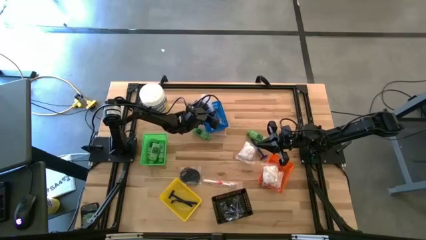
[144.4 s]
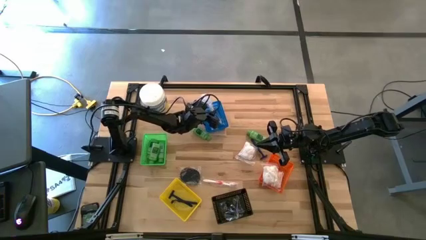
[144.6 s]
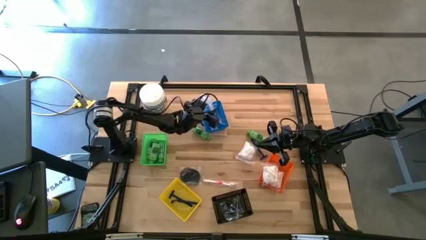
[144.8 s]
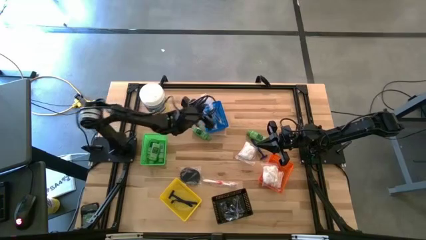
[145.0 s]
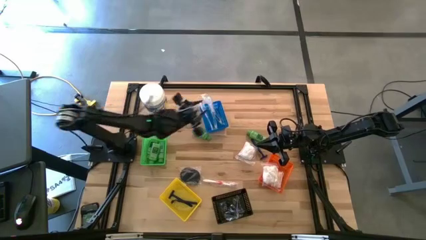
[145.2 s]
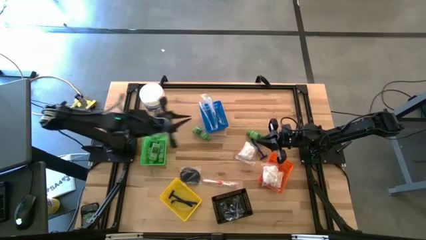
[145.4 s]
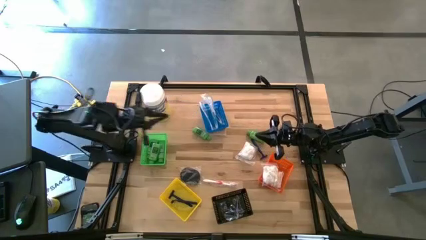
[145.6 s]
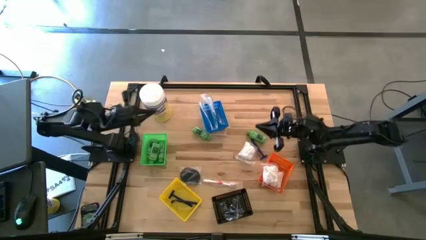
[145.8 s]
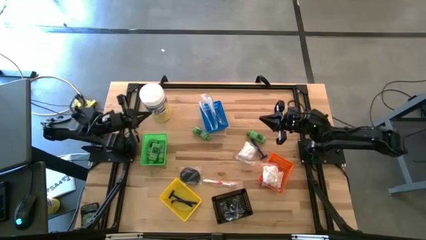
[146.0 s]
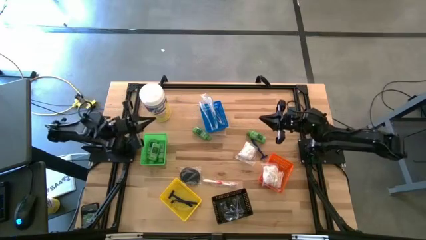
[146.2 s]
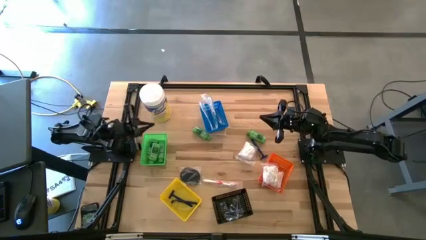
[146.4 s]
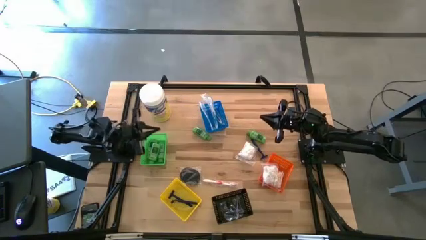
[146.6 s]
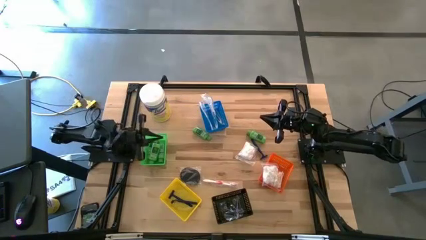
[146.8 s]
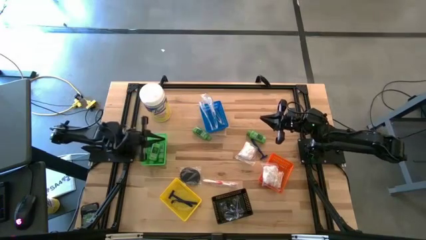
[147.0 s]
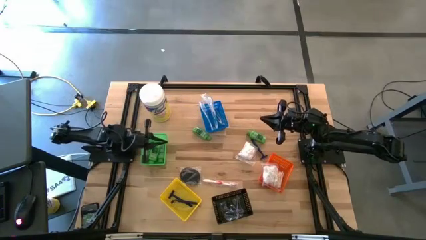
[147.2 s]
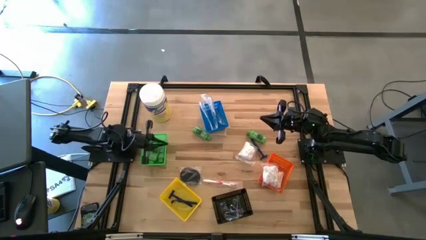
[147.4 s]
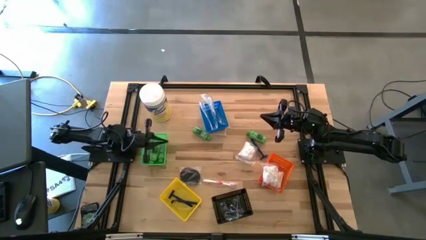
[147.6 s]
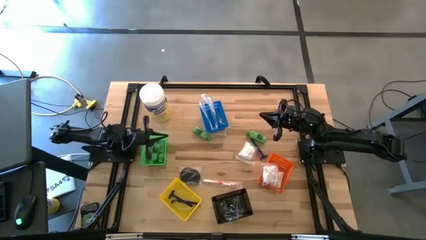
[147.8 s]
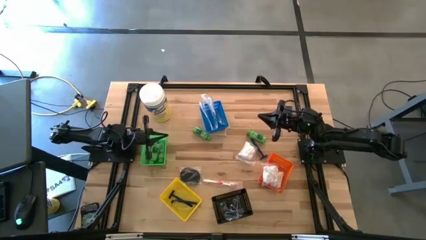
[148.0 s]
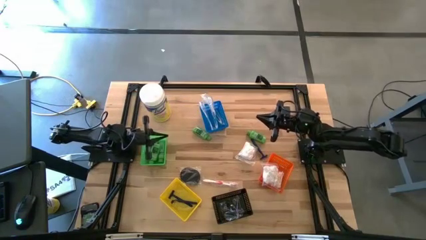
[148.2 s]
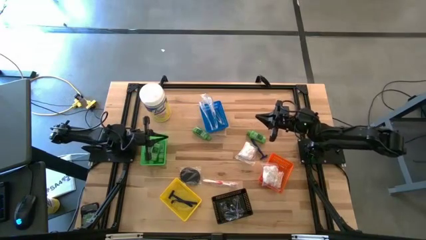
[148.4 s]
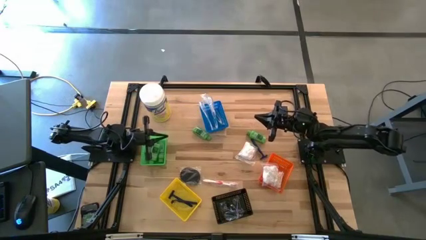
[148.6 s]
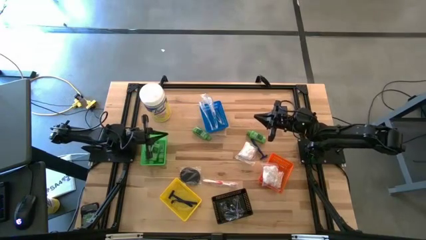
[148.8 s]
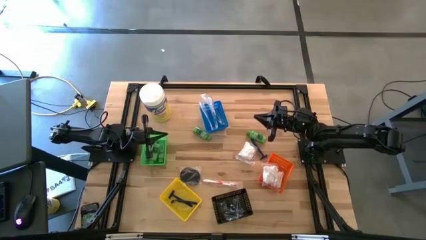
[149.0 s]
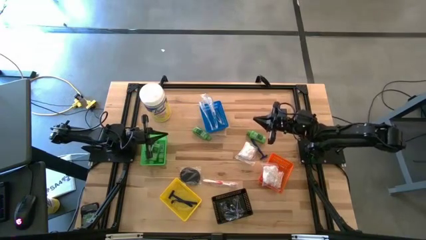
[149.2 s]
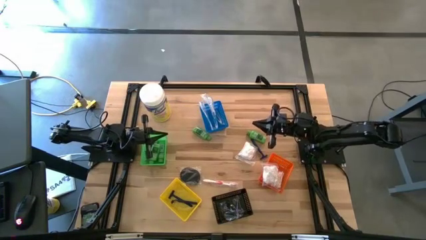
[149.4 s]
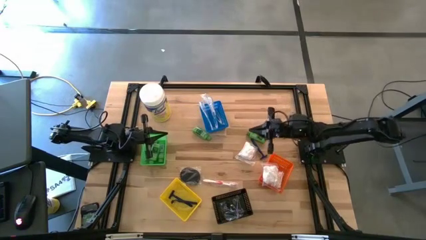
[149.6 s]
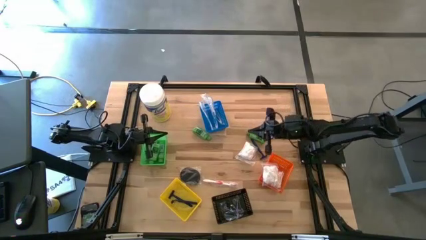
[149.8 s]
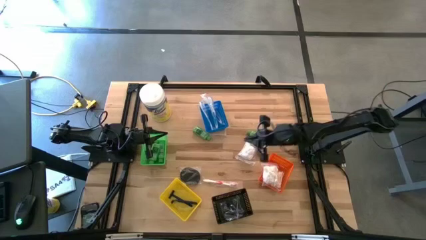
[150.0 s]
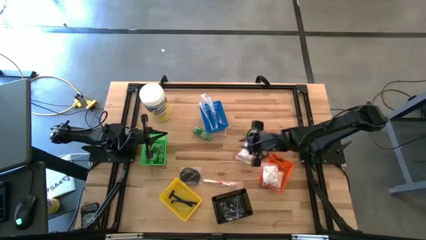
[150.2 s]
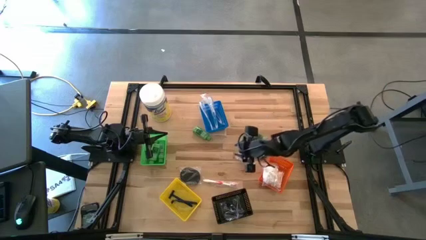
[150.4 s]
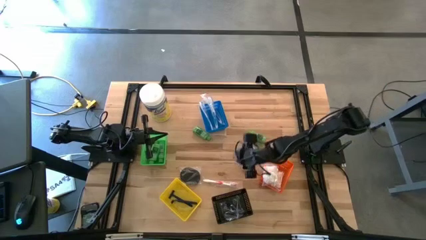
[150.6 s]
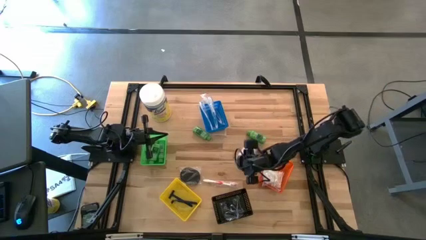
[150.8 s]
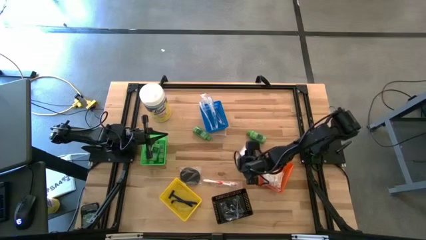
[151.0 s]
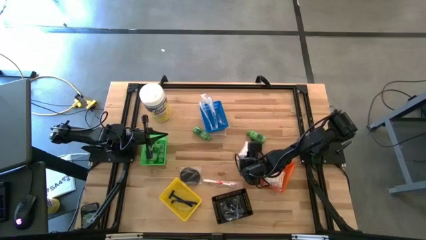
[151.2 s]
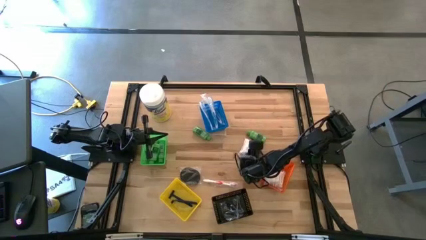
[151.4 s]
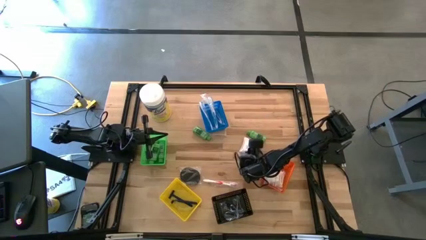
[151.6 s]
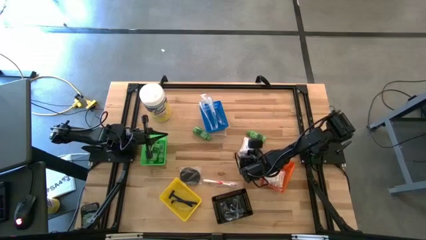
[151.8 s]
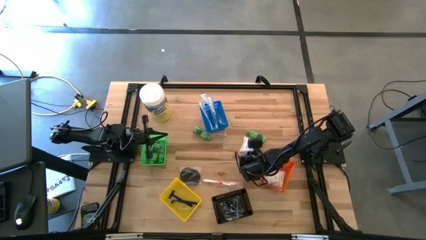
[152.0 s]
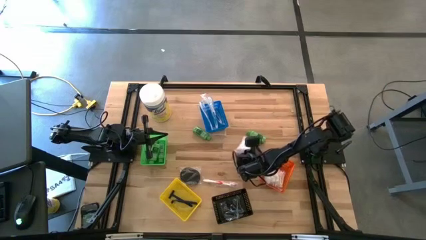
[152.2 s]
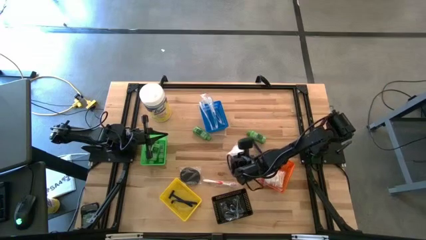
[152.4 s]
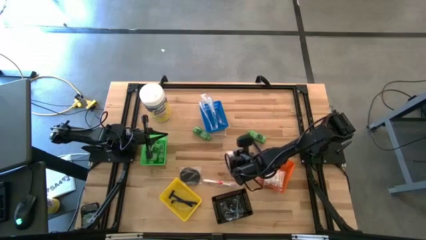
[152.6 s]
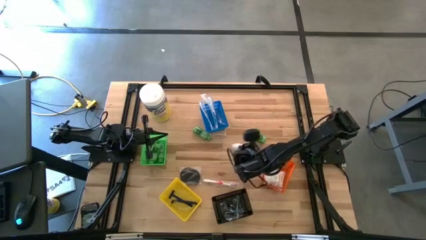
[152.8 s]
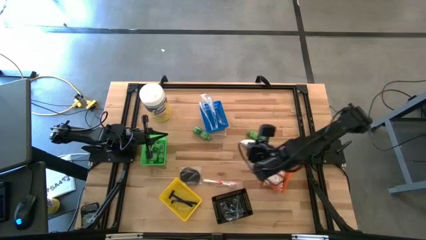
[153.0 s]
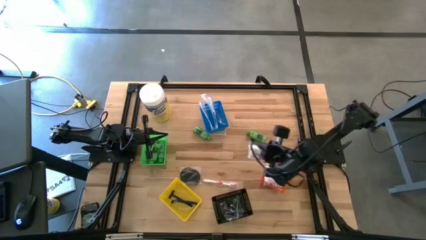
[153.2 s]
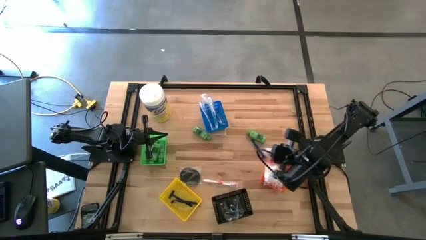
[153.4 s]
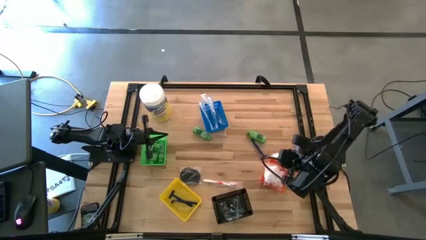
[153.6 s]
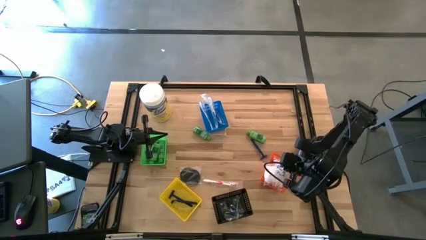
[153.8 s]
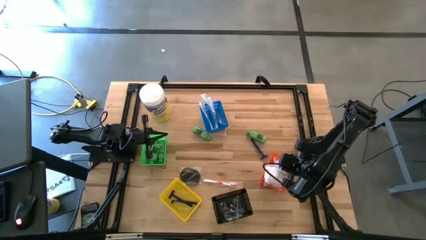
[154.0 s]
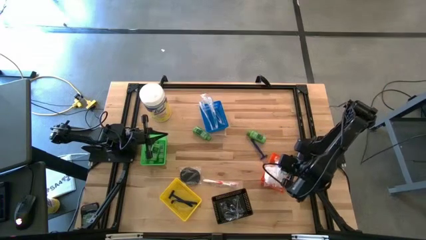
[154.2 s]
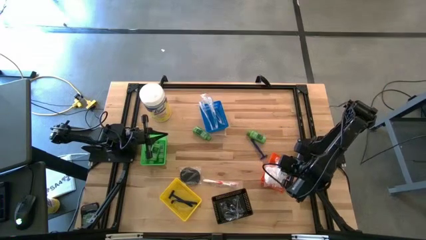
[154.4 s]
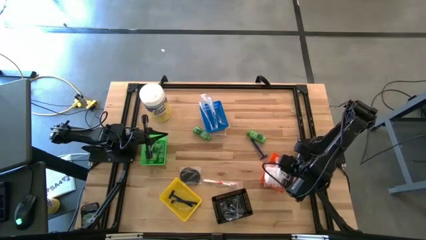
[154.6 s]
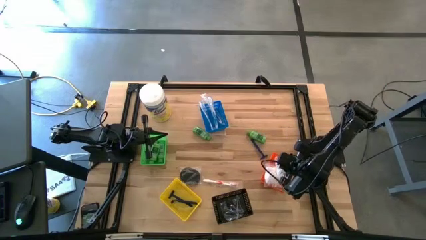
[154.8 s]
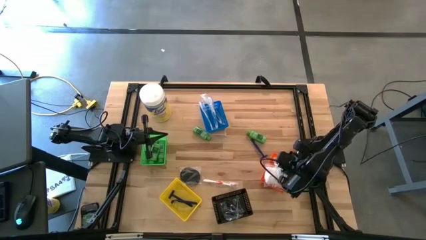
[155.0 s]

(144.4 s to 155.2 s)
Task: Pick & Place Travel size toiletries
Put the white cotton pack into the orange bin

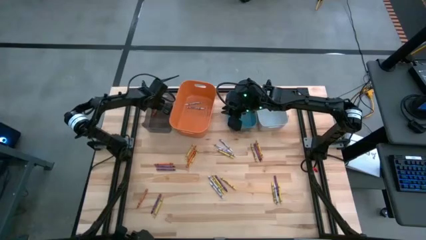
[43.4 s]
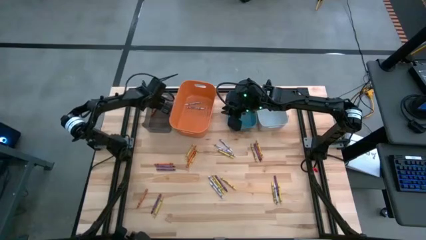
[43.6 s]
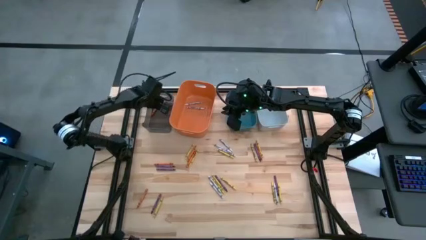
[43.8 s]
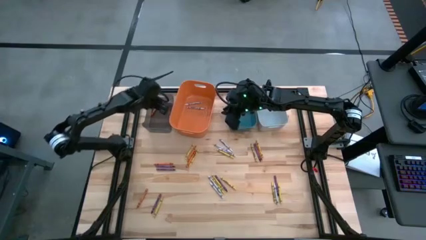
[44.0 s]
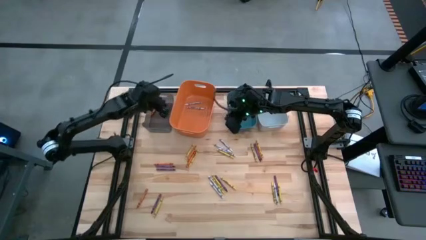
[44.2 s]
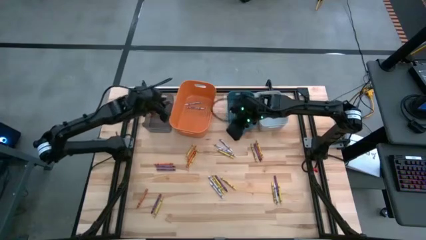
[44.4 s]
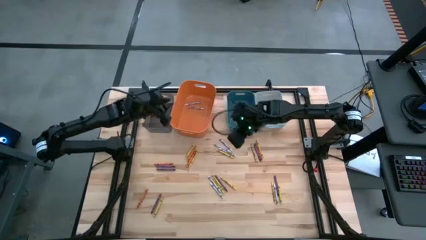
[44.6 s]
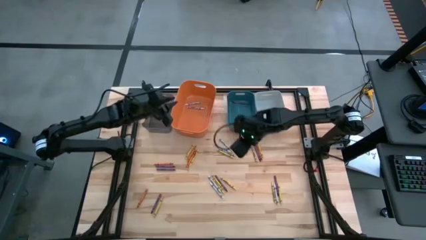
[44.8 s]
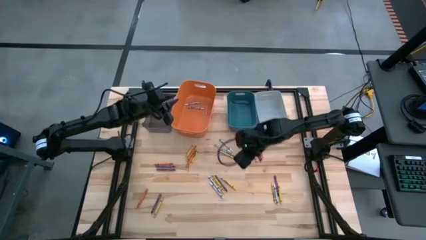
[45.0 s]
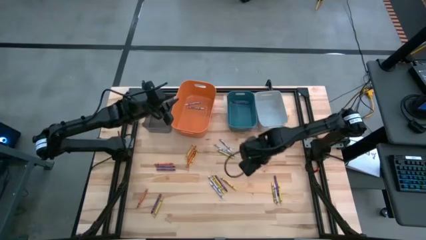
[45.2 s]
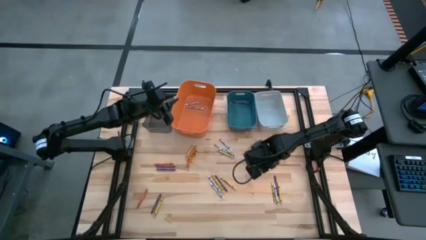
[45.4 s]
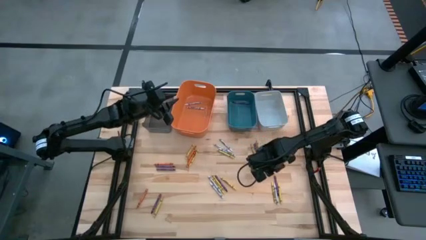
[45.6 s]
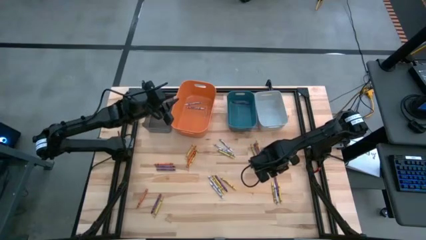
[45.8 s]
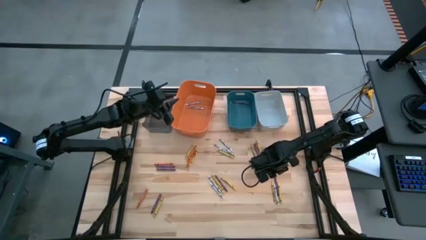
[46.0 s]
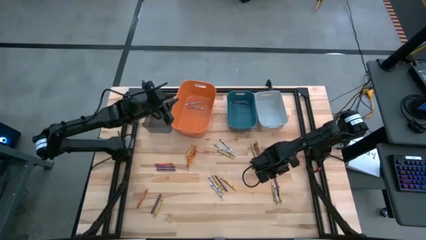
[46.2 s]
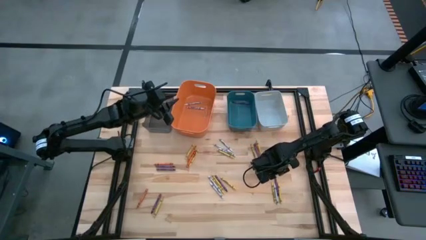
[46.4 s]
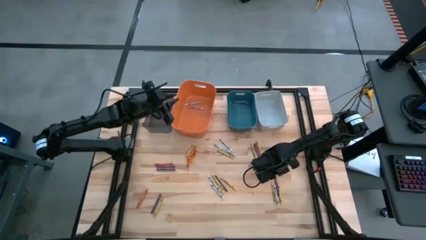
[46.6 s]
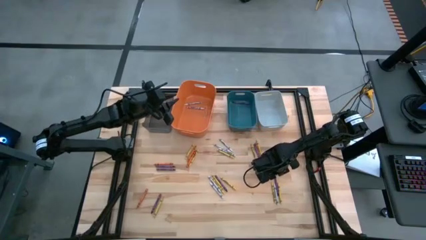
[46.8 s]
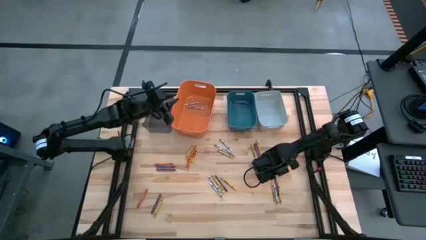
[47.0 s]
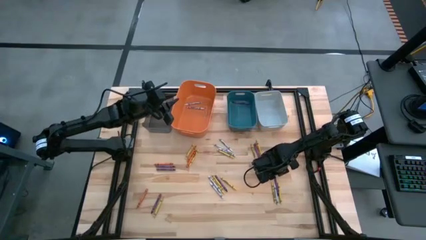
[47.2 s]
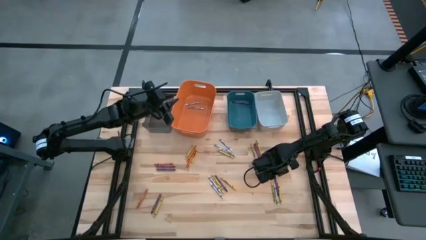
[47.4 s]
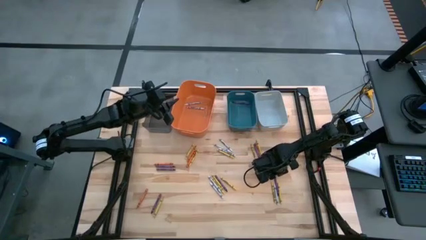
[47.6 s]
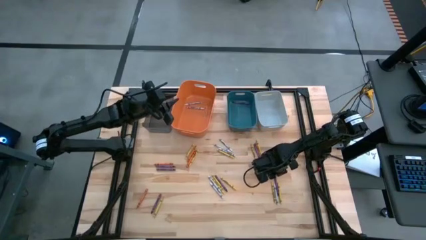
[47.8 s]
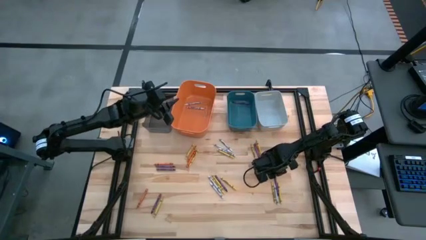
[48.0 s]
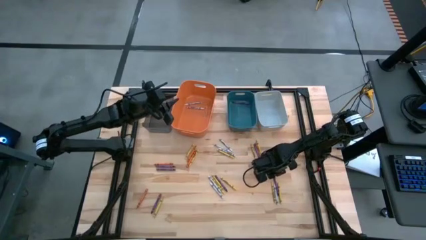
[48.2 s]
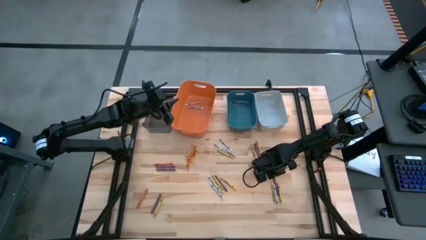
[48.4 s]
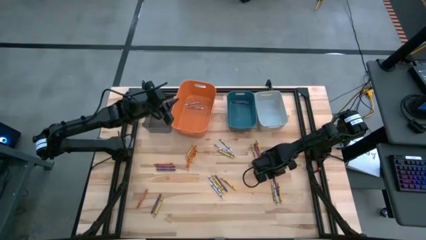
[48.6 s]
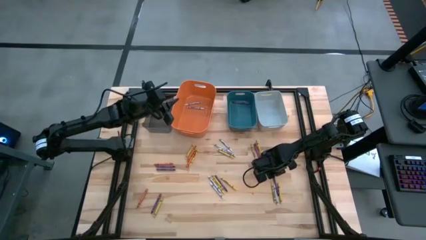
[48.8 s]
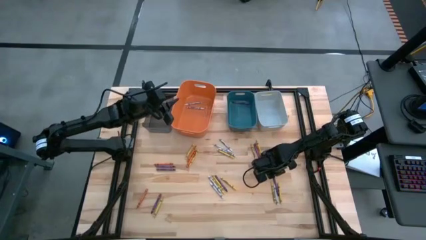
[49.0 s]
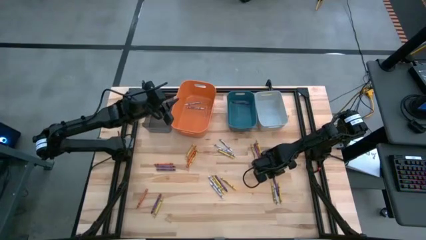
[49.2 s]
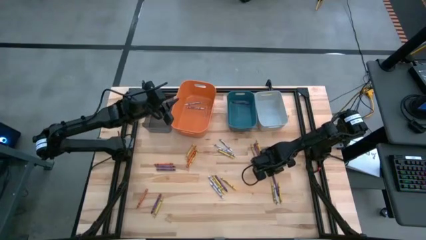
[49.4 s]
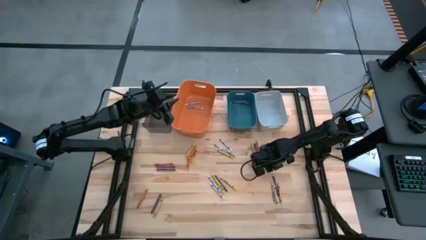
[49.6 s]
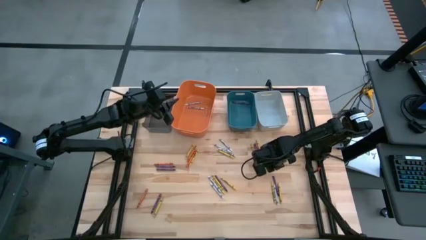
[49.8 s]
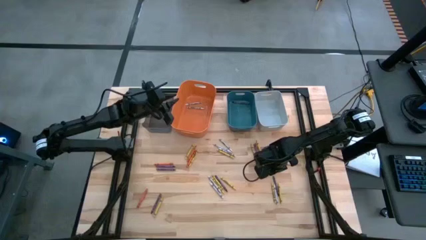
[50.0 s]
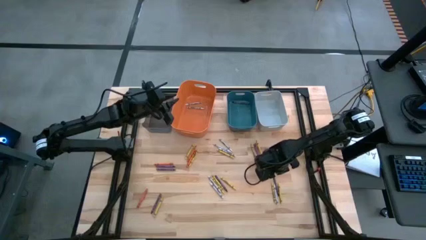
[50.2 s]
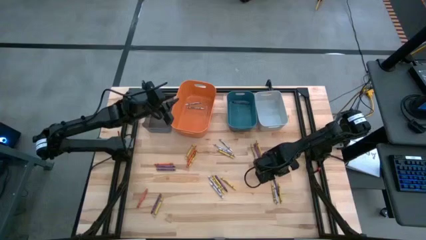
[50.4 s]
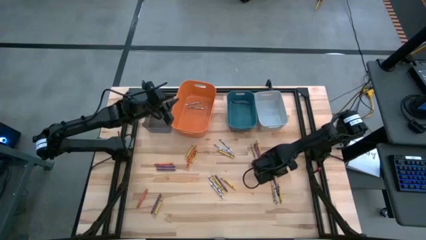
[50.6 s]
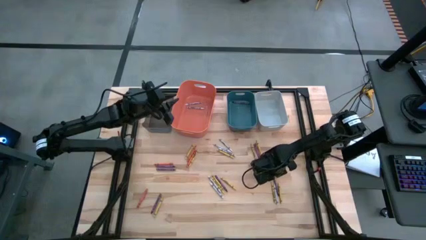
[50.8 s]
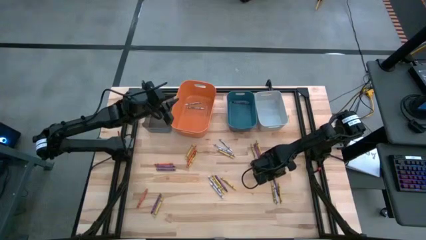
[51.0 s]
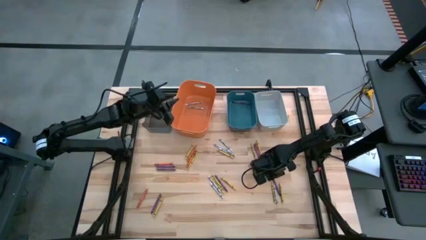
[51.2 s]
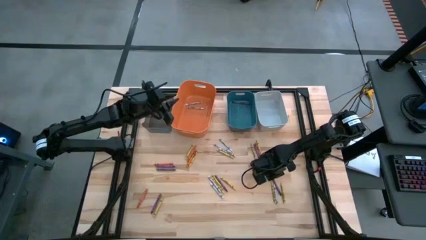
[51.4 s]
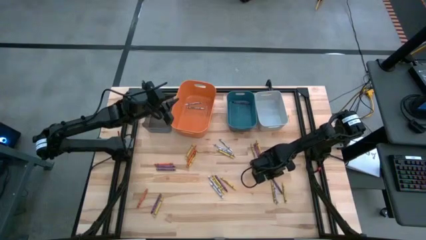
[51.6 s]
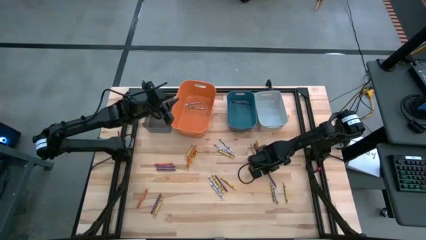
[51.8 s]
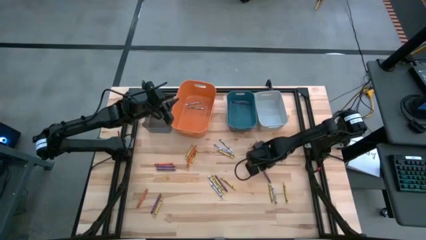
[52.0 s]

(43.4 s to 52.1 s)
Task: Sort crayons
Put the purple crayon into the blue bin
